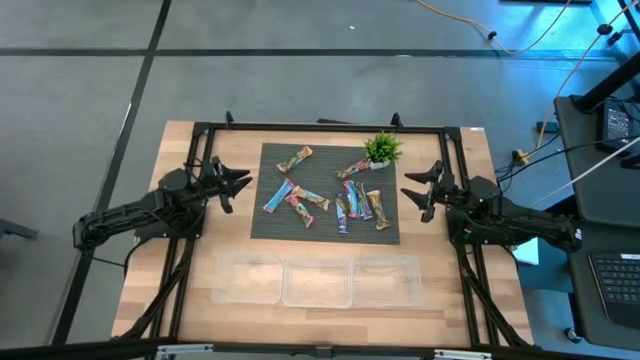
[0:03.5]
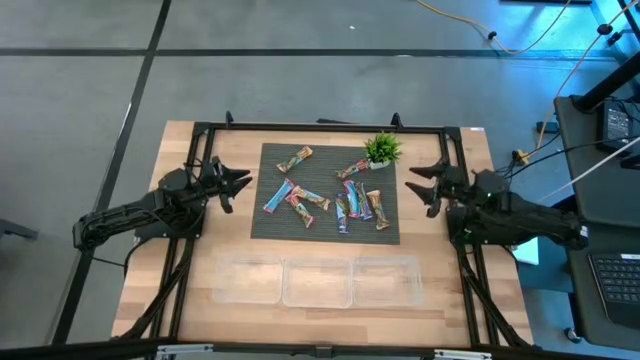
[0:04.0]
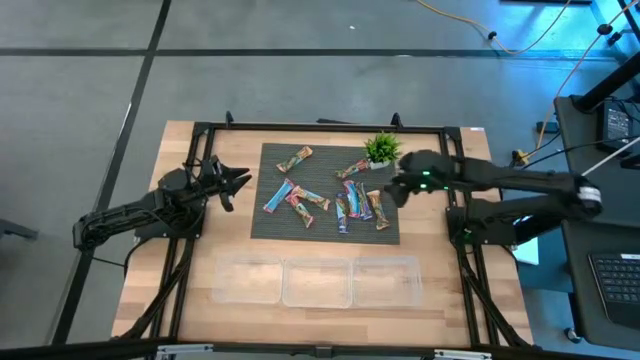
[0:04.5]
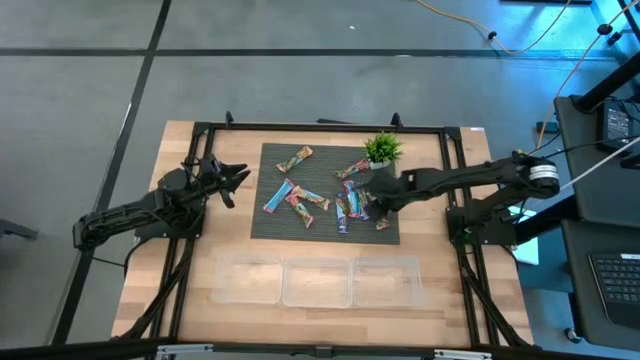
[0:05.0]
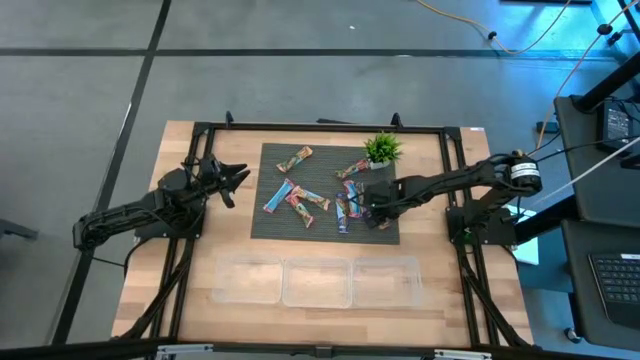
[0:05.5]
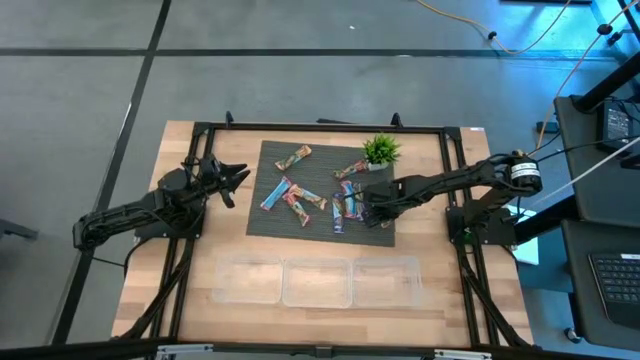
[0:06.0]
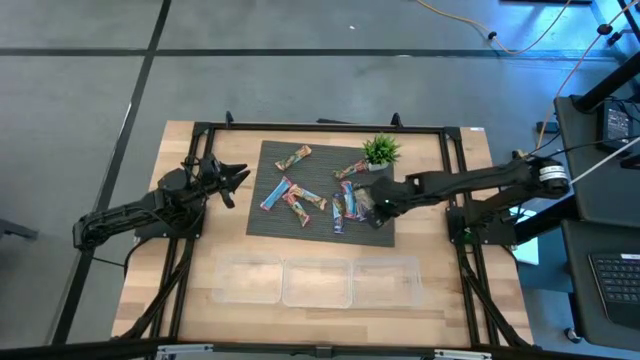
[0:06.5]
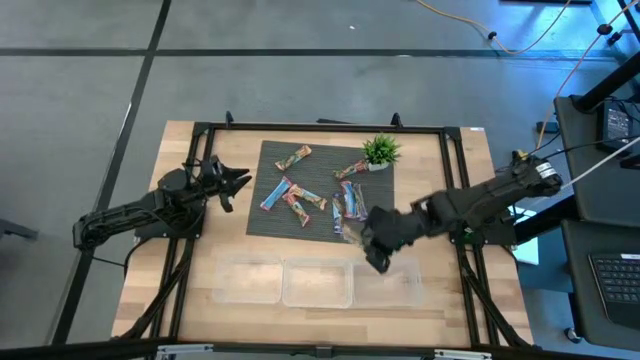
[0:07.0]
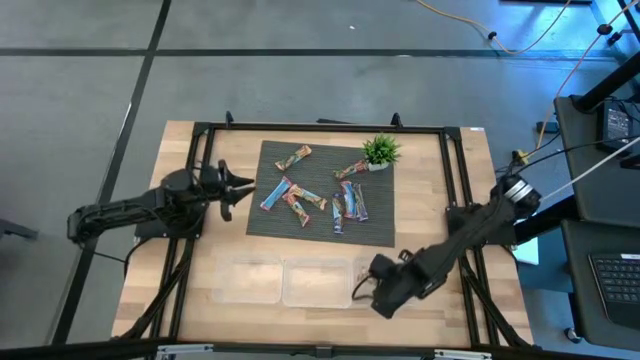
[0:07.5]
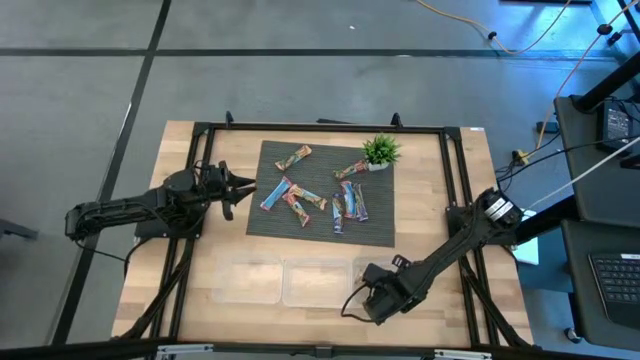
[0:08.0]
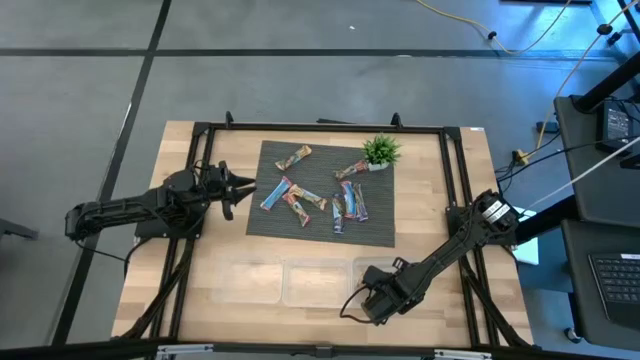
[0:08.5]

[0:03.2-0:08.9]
Task: Pick and place Granola Bars by type
Put the yellow granola bar into the right transparent bin

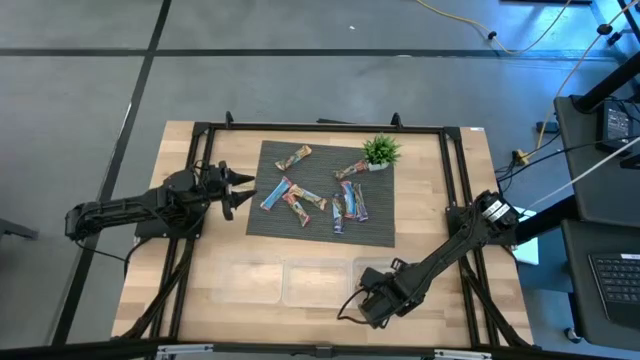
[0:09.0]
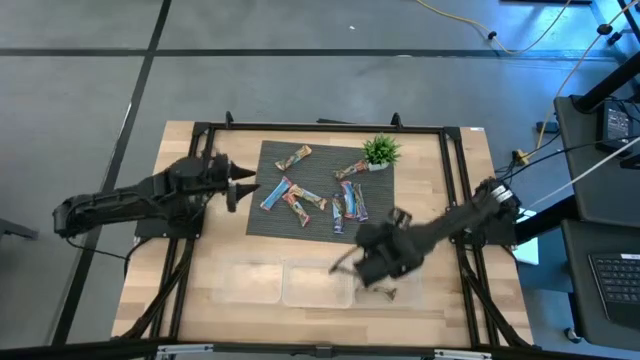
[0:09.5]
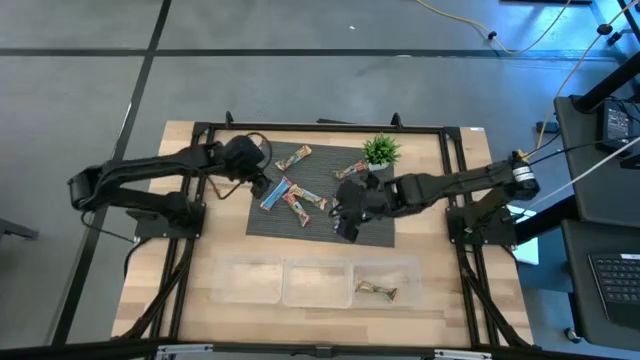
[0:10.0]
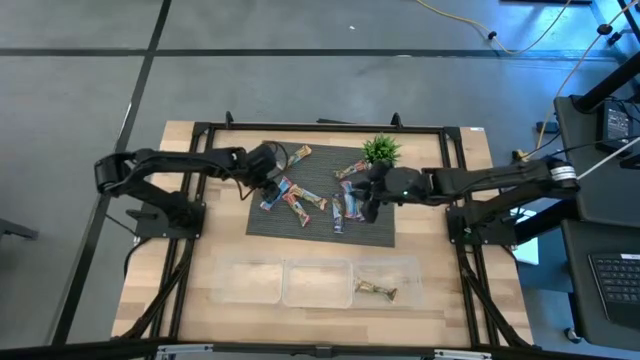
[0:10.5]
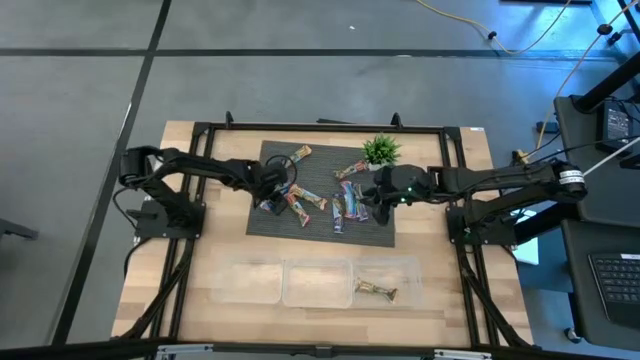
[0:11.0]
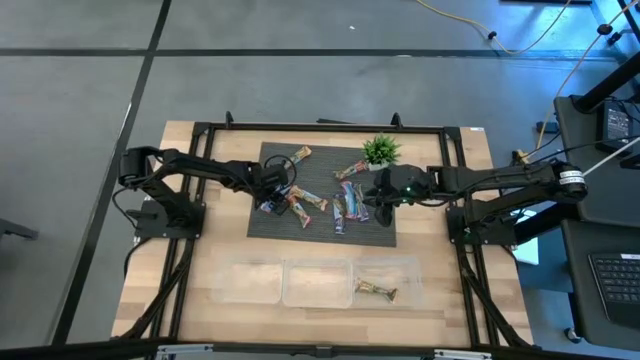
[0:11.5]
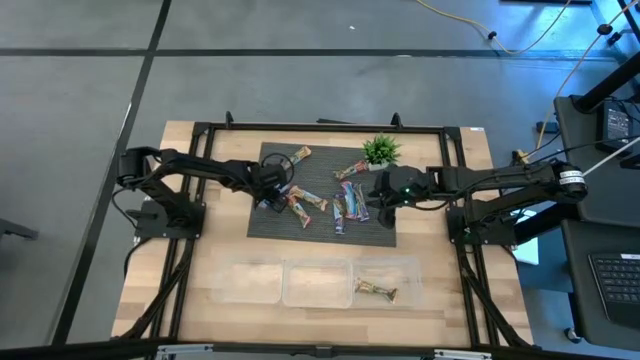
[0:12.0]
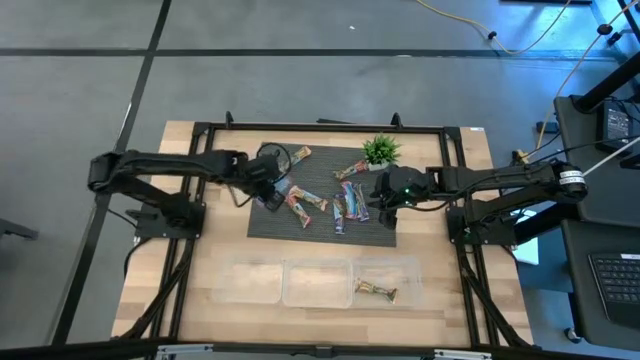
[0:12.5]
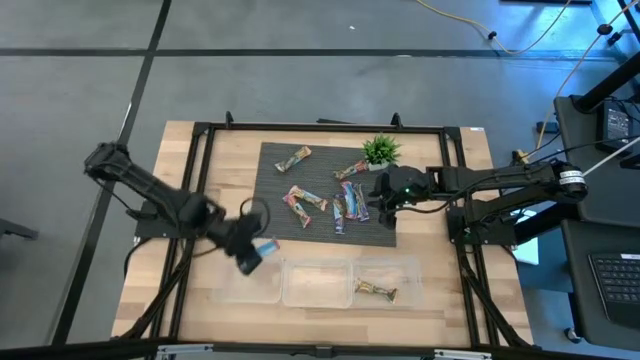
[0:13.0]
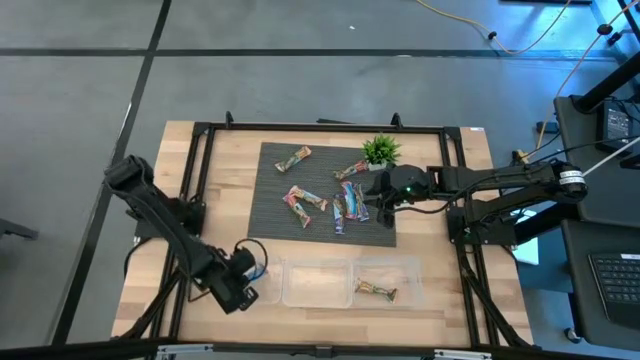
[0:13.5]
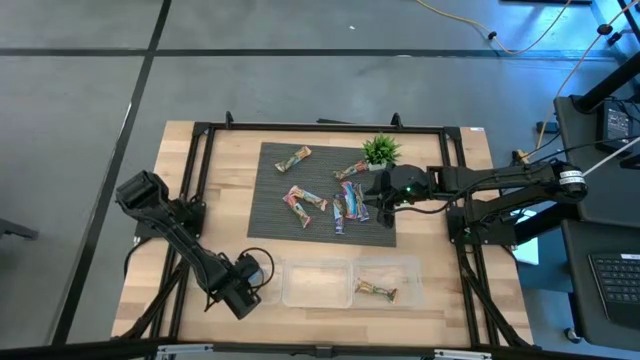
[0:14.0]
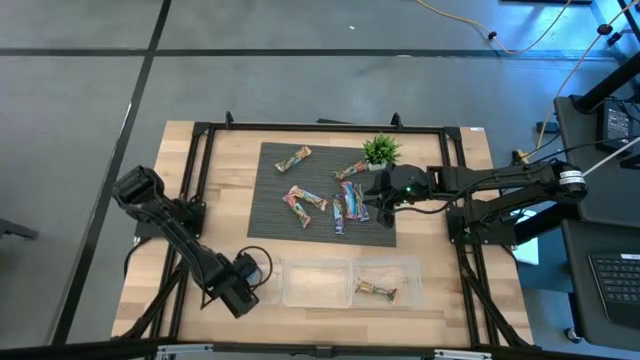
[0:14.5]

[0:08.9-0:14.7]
Put the red granola bar into the left transparent bin

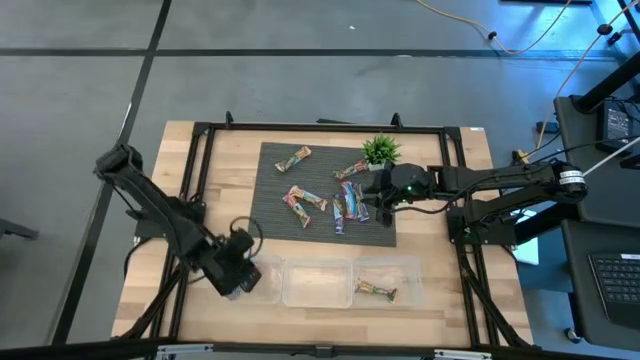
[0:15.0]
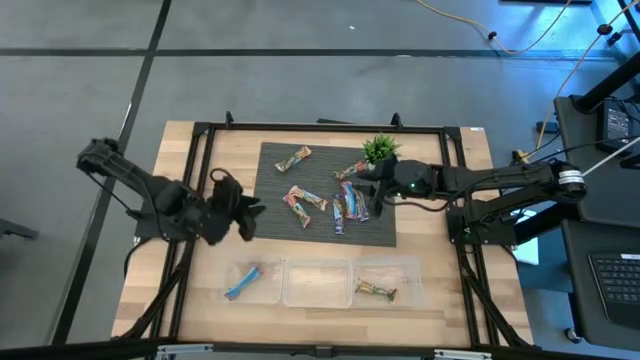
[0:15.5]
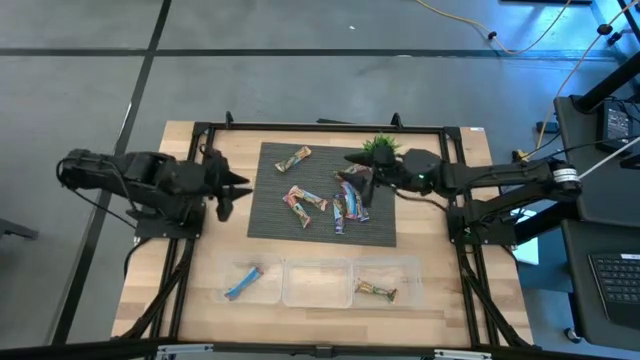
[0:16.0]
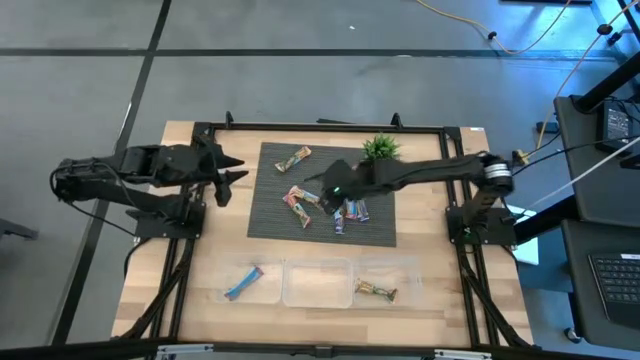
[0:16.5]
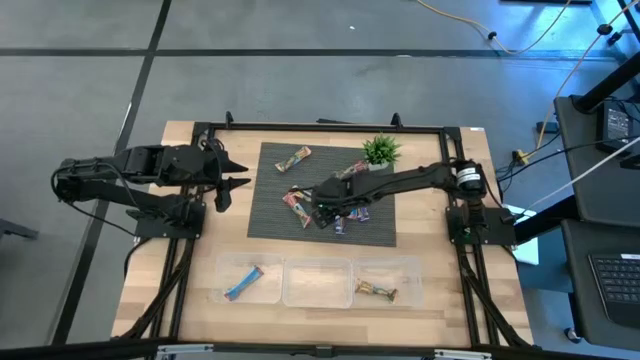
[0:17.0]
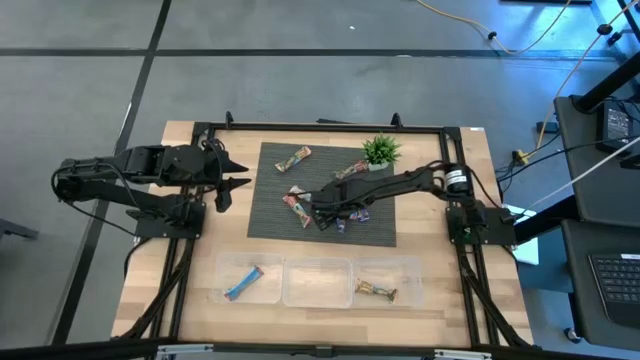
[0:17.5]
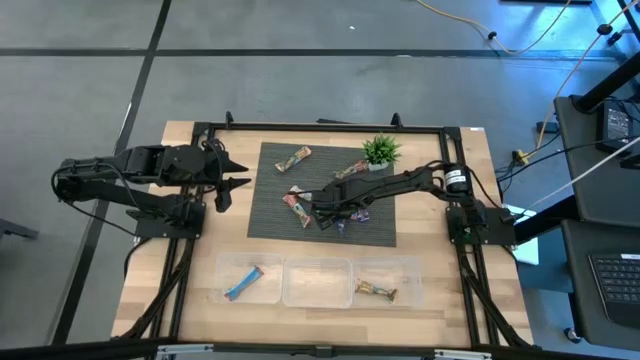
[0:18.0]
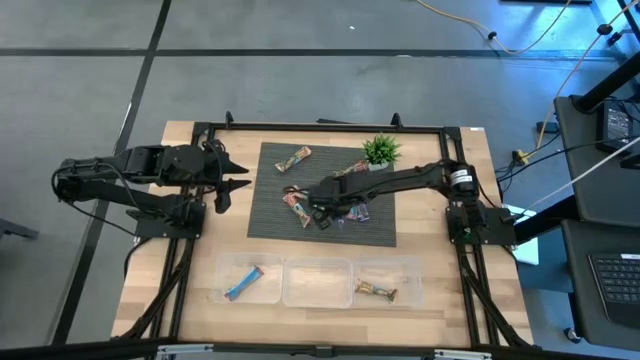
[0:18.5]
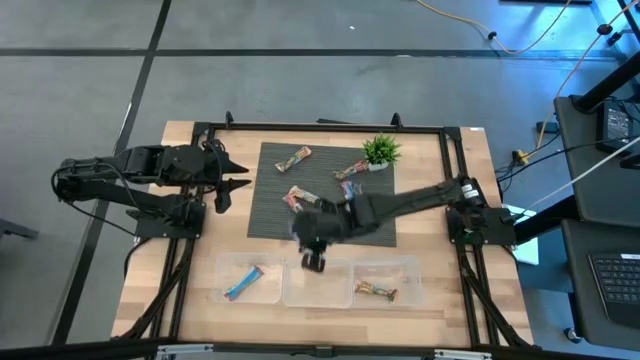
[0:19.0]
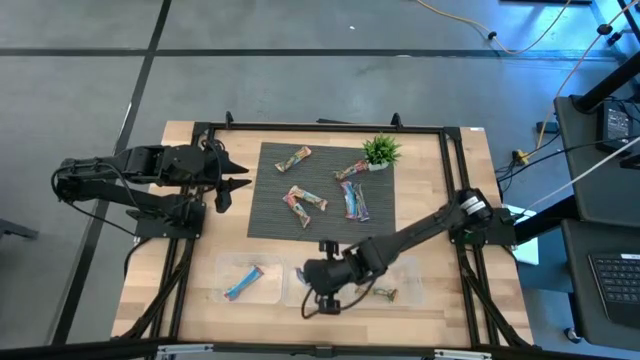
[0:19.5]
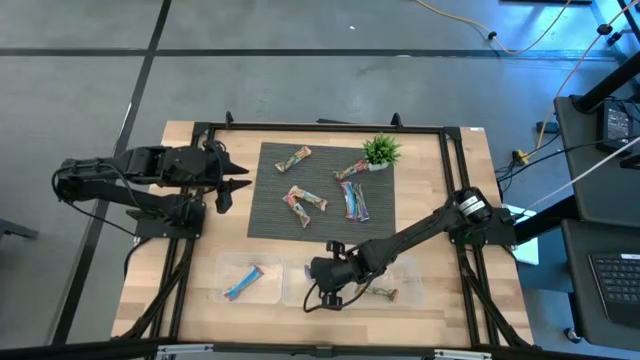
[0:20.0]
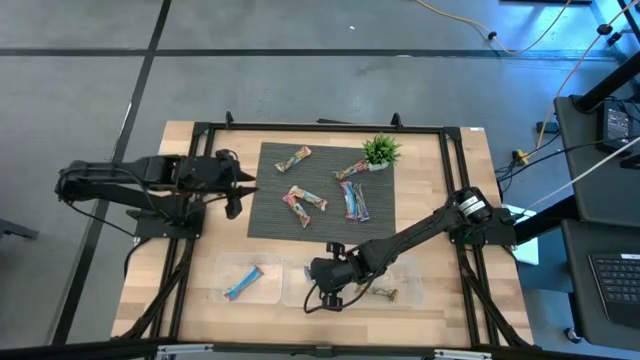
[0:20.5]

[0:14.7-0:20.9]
Put the blue granola bar into the middle transparent bin

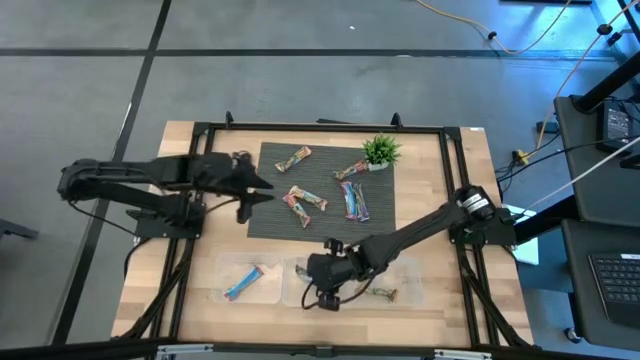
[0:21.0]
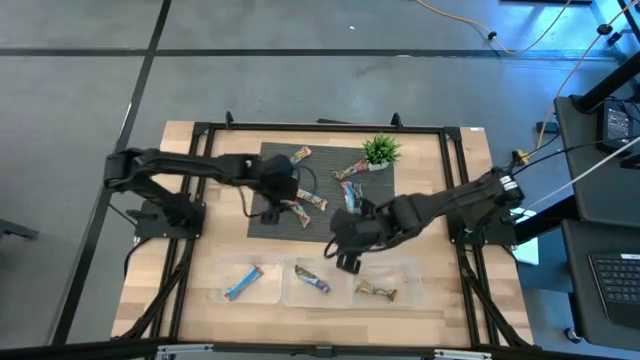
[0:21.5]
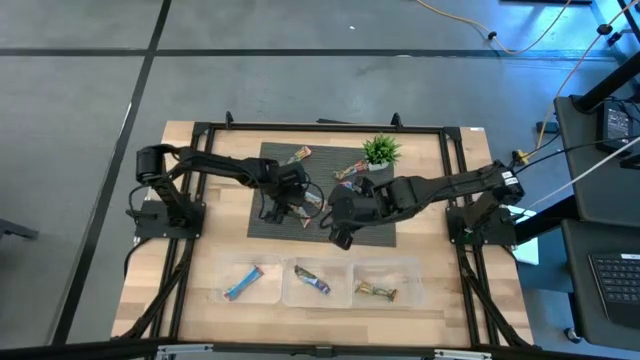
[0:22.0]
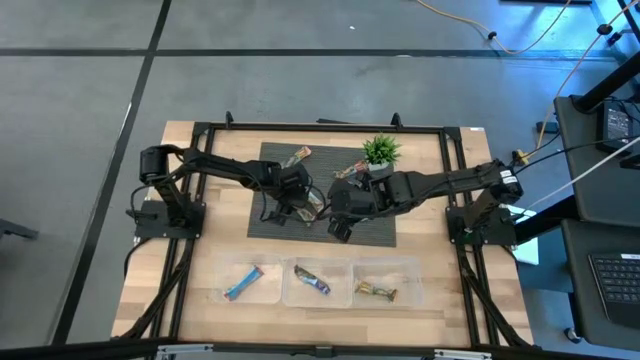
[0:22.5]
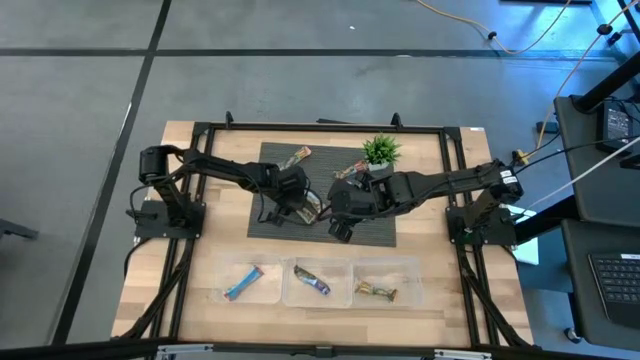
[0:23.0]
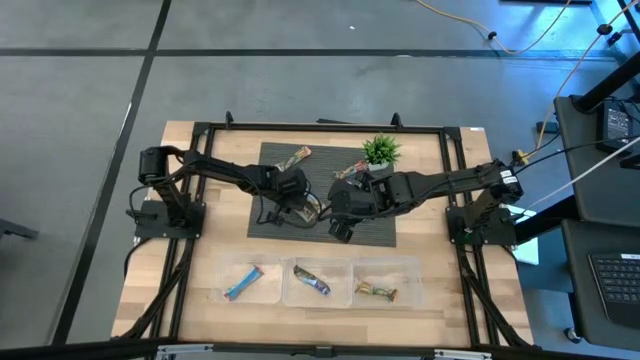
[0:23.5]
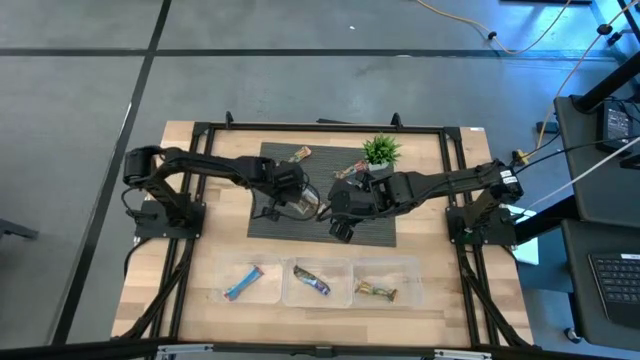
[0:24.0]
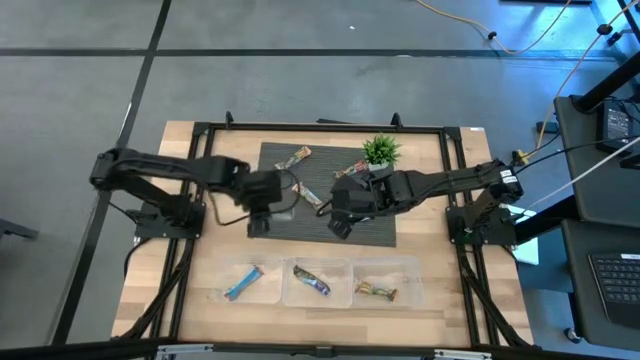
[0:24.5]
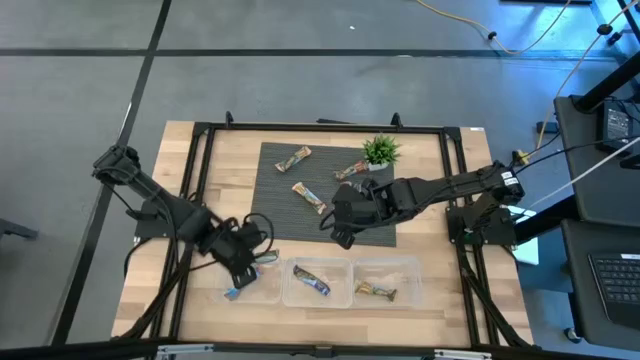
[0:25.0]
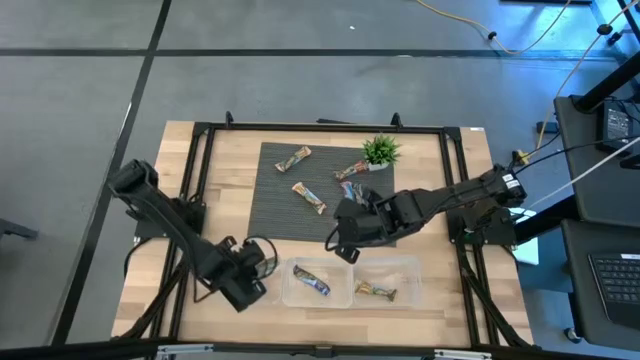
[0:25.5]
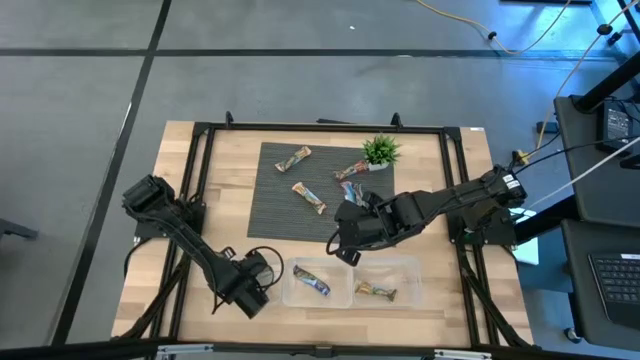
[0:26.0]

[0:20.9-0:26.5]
Put the red granola bar into the left transparent bin
